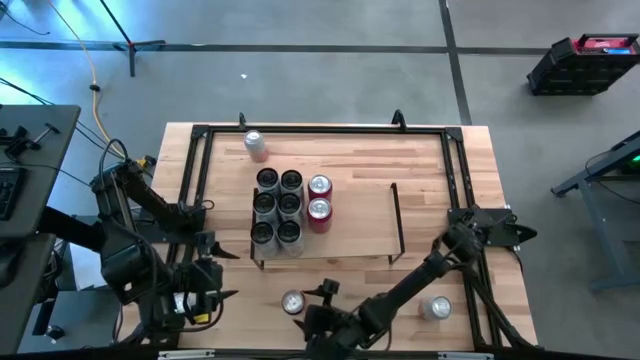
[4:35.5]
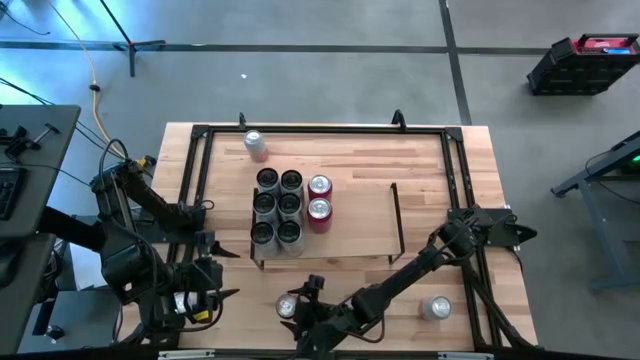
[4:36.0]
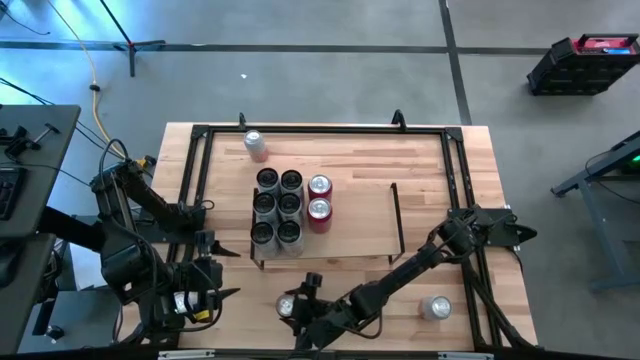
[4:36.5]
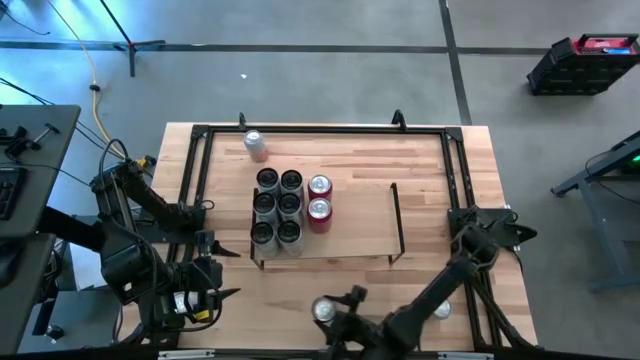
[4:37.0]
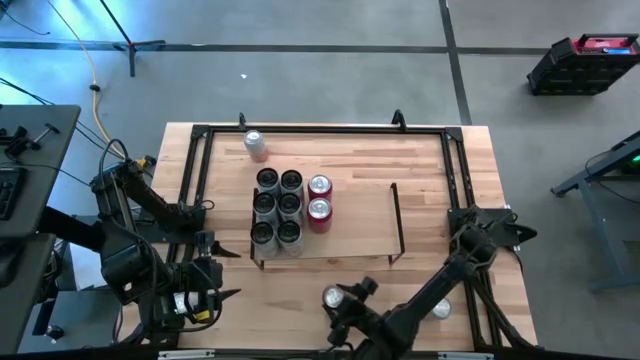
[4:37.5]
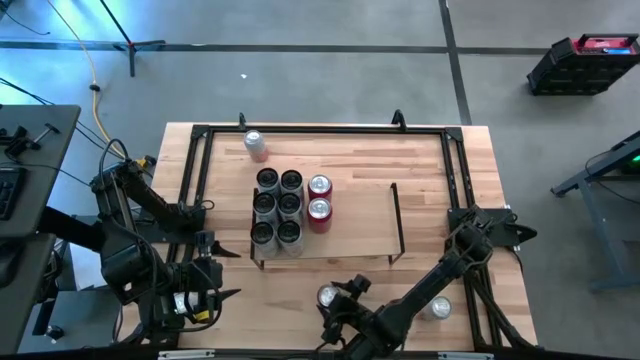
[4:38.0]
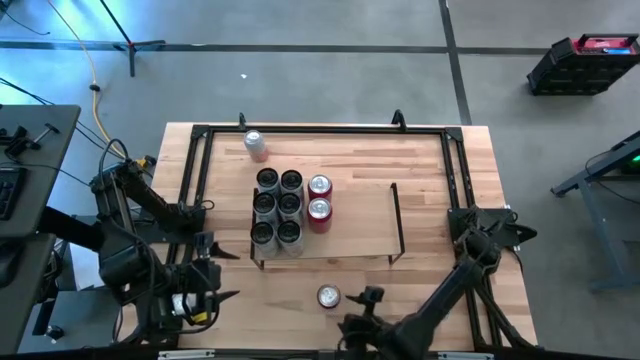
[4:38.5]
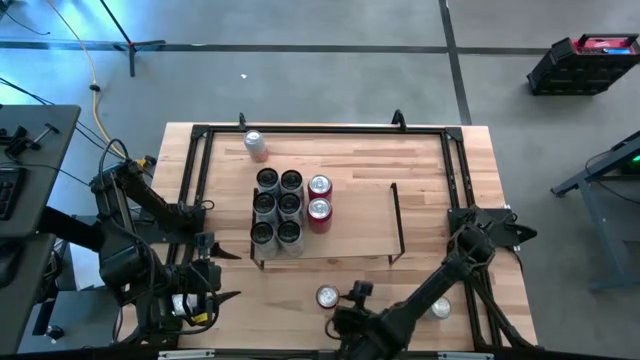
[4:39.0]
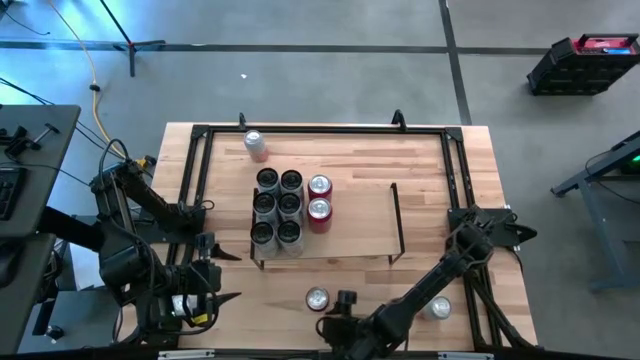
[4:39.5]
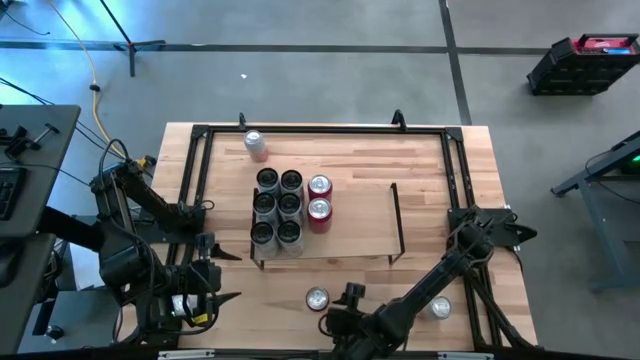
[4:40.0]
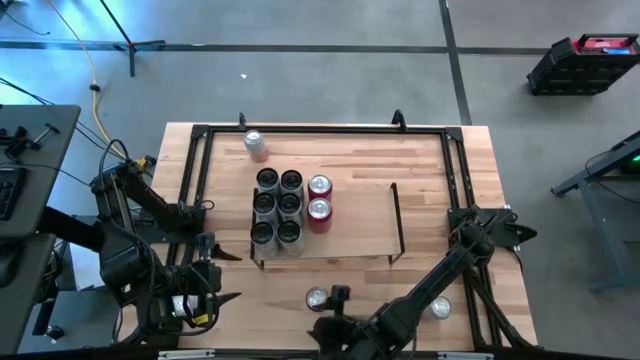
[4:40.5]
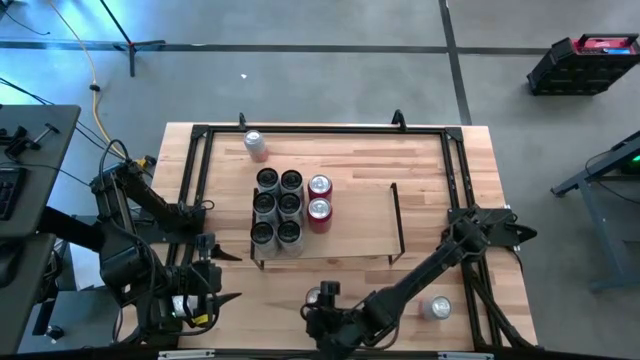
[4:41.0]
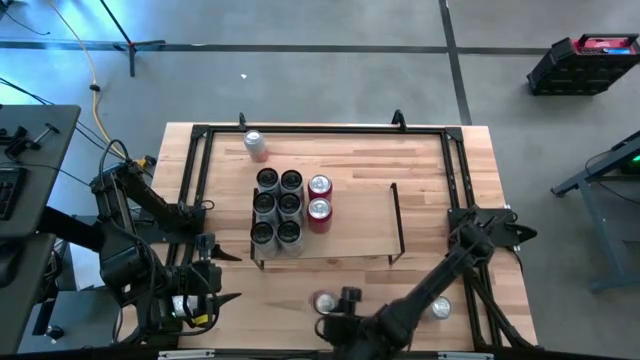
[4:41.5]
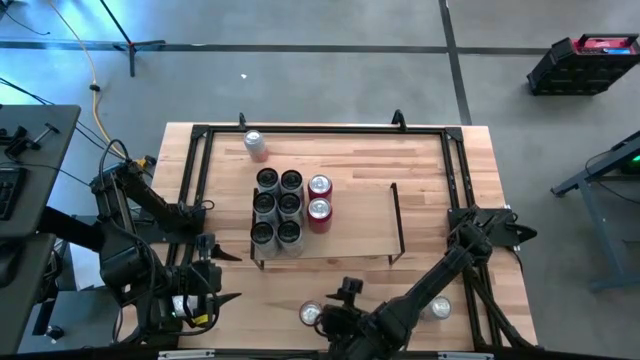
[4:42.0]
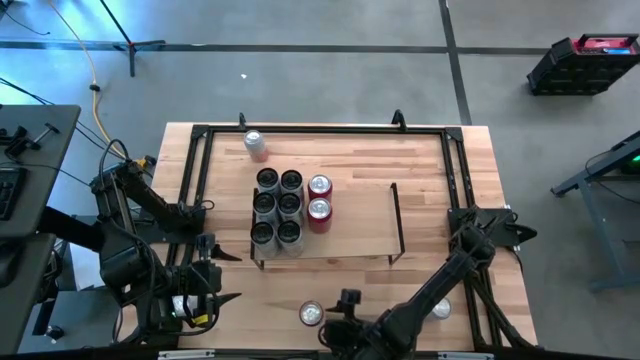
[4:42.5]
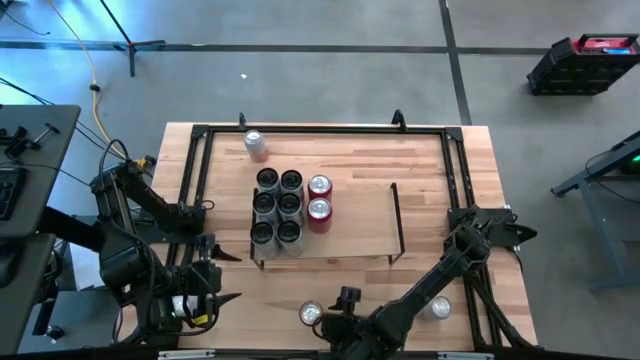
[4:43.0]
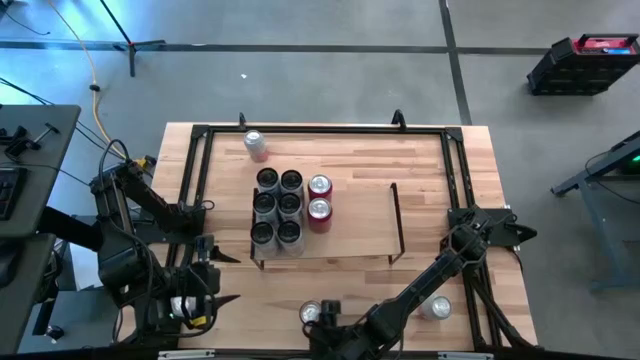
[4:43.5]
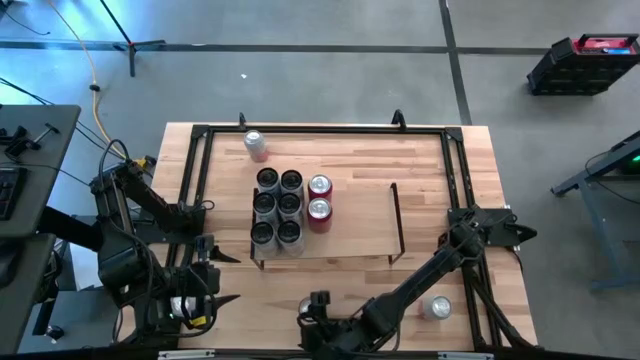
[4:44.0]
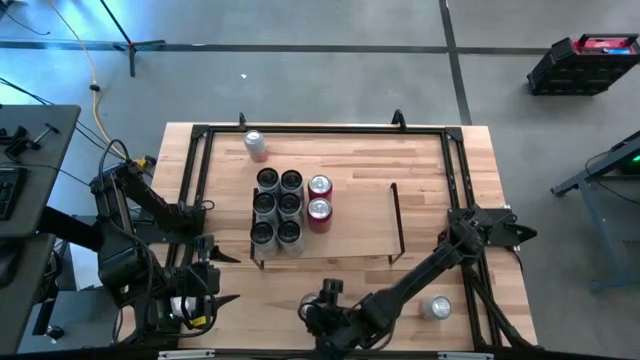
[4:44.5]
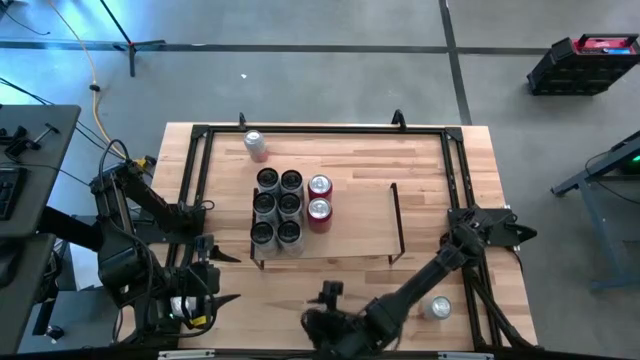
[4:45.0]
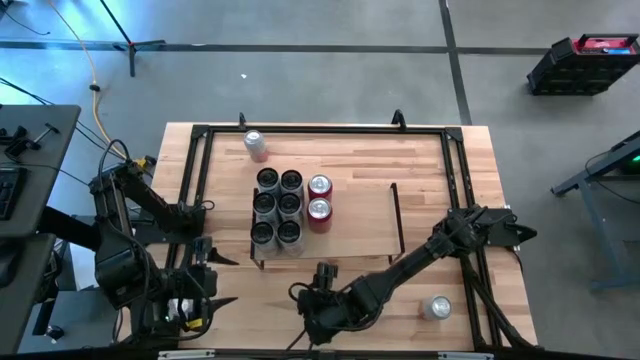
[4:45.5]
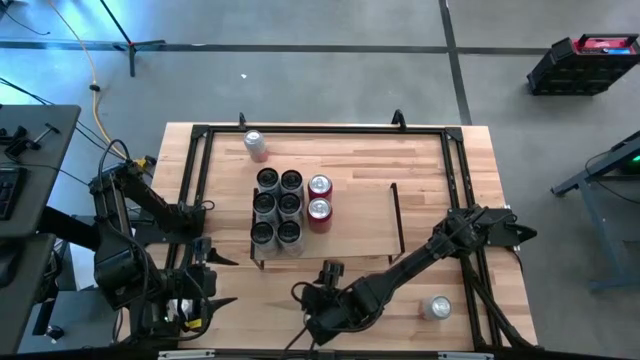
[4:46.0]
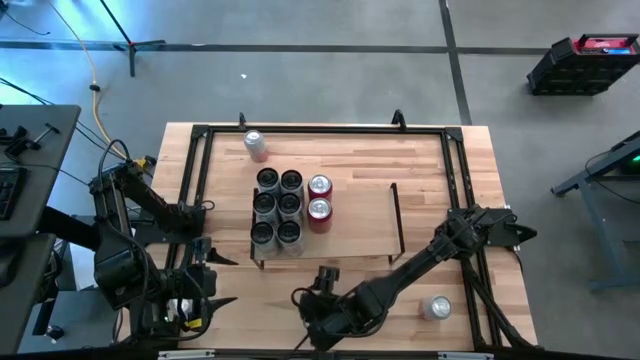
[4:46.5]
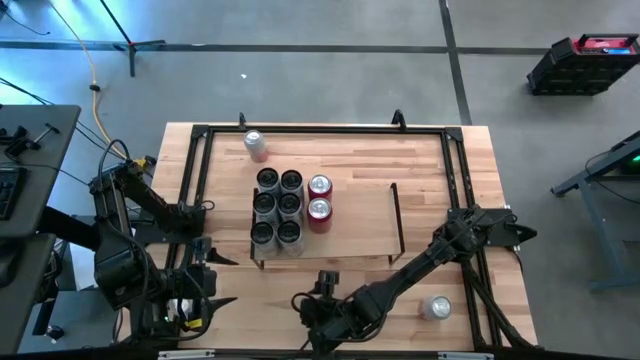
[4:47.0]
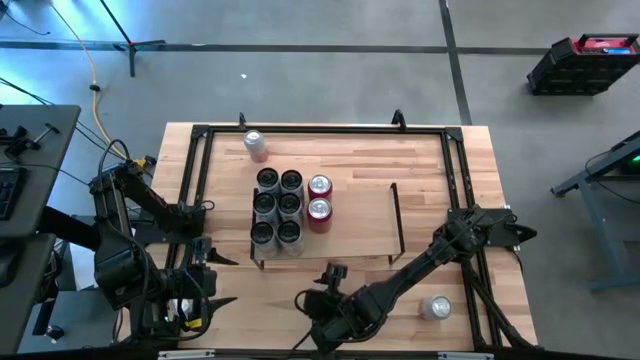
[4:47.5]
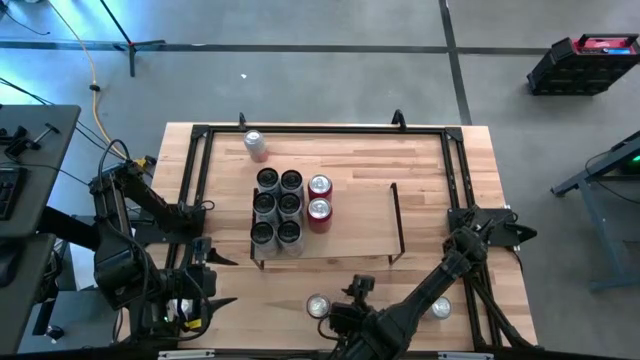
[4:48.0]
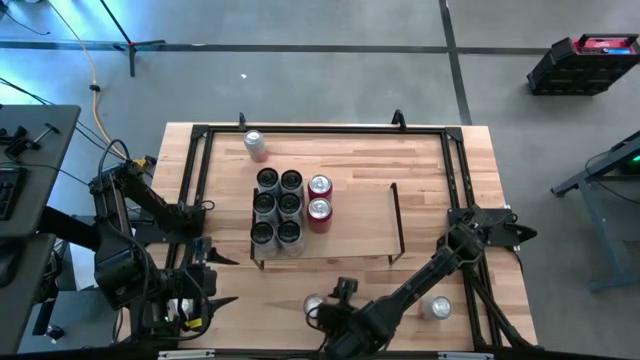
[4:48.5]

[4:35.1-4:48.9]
Task: Place canned beverage on shelf
Put the red soda can aligned with the other red soda cans on the shelf

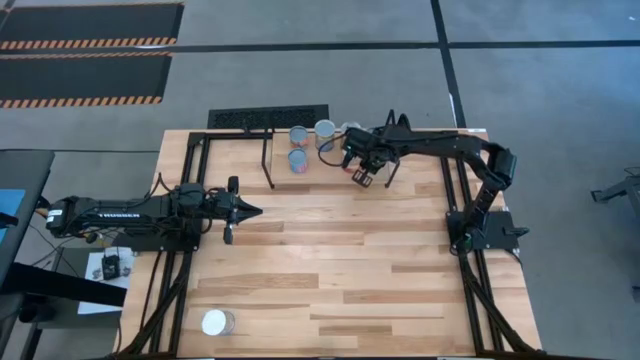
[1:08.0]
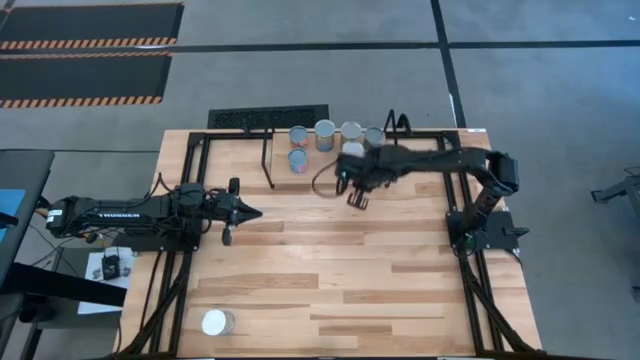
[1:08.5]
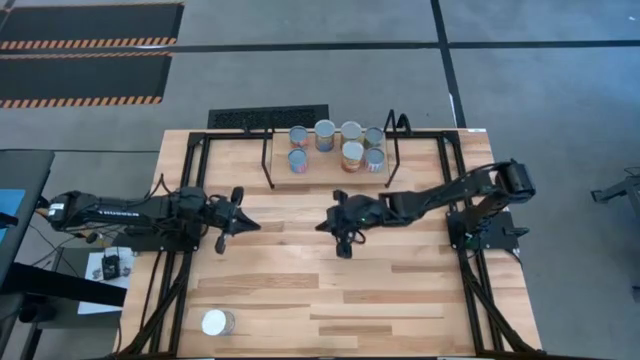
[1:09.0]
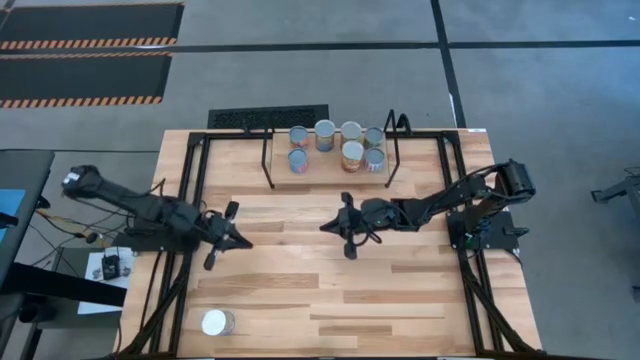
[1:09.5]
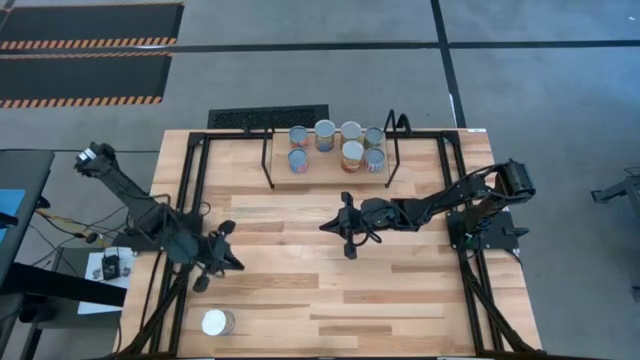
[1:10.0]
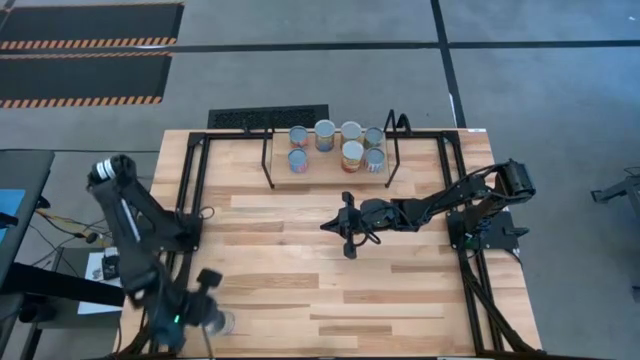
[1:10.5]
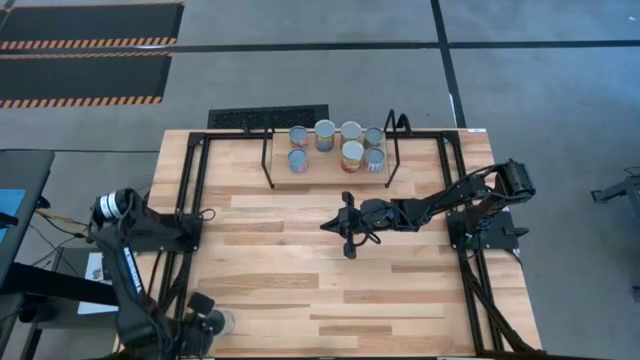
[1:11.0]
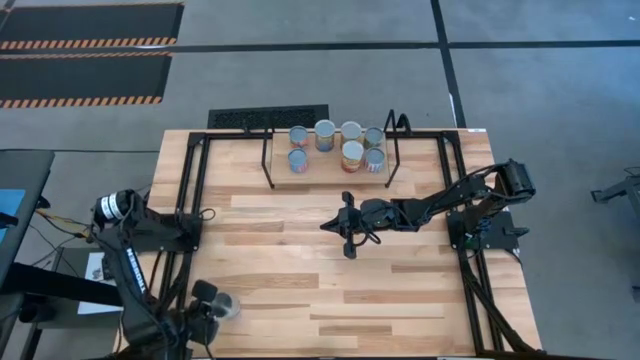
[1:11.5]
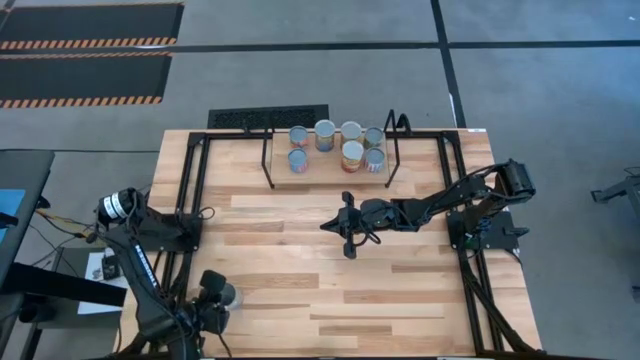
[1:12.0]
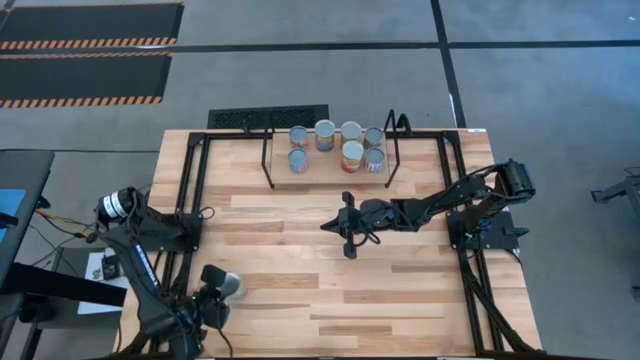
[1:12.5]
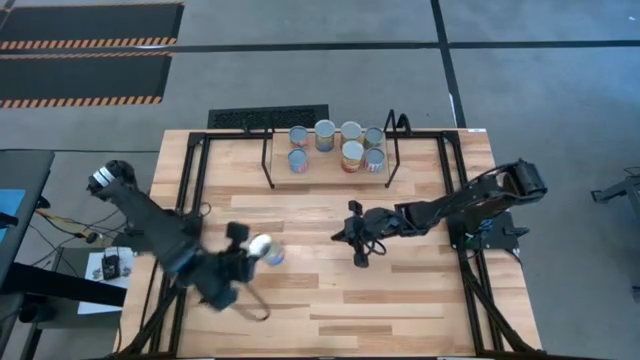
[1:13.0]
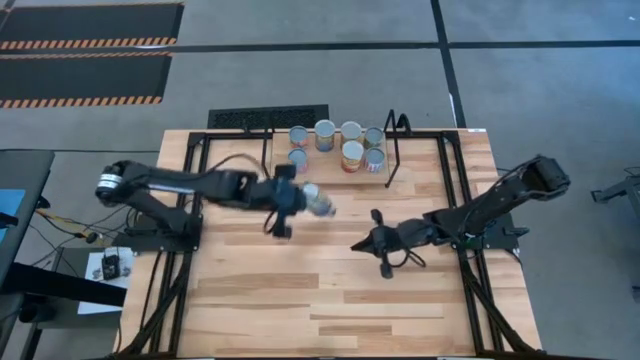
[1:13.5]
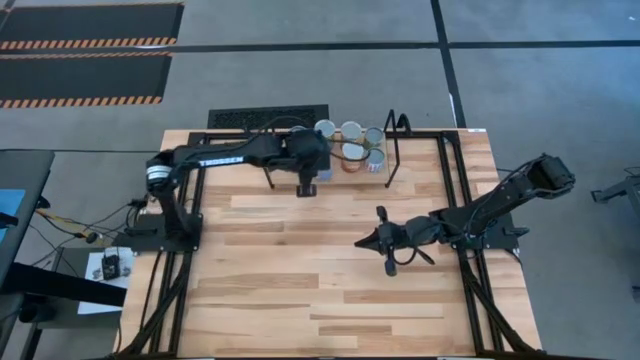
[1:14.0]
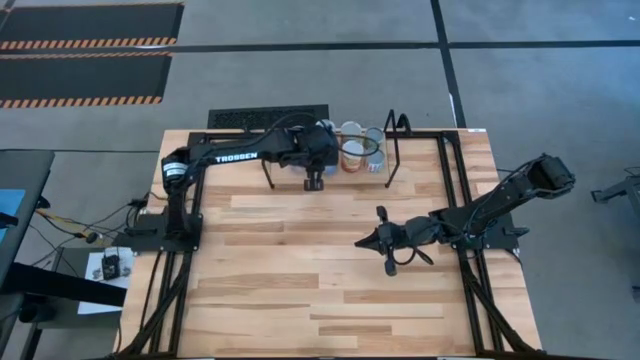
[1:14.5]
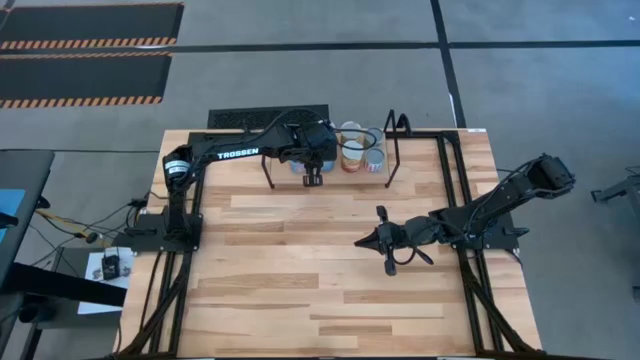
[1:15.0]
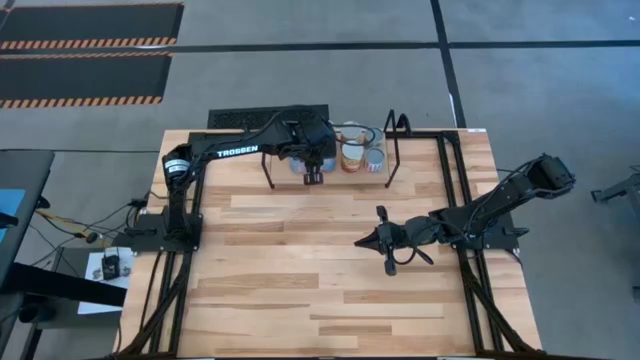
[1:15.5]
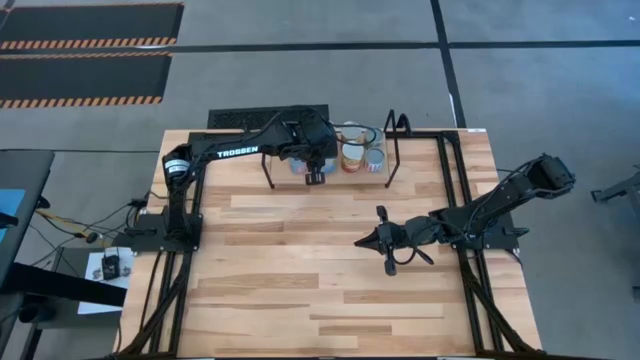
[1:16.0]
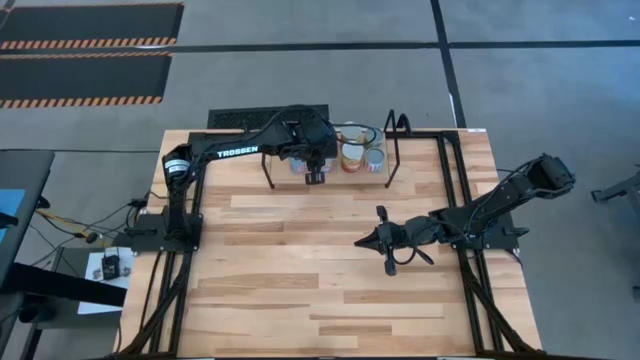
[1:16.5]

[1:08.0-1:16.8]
Task: Pick and place cans onto a shelf
Put the canned peaches on the shelf aligned with the canned peaches
